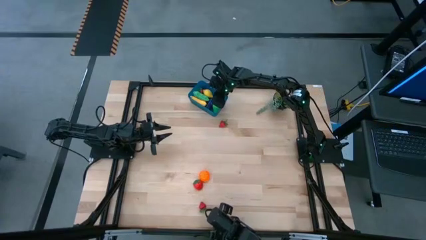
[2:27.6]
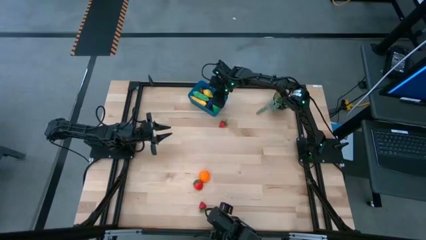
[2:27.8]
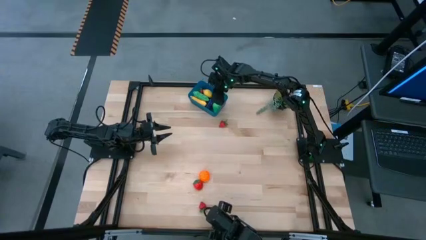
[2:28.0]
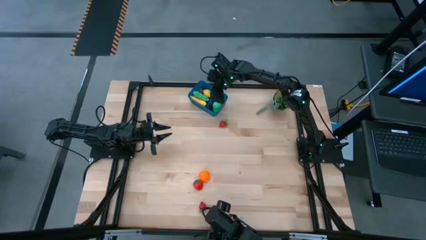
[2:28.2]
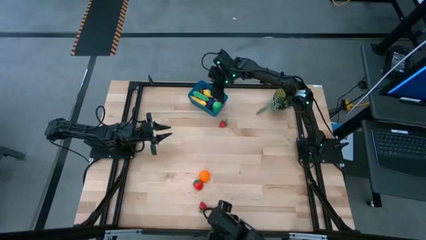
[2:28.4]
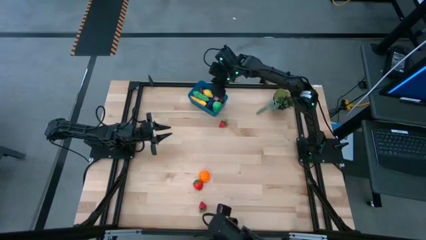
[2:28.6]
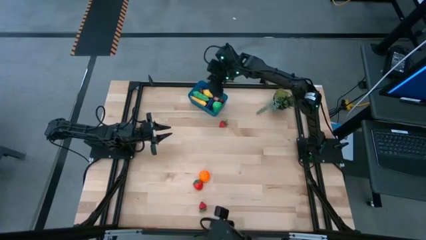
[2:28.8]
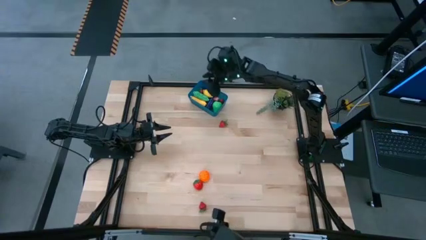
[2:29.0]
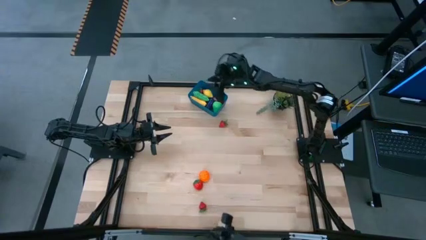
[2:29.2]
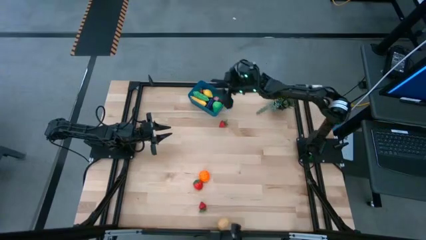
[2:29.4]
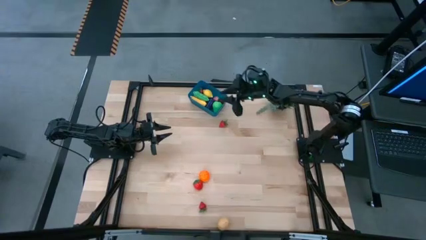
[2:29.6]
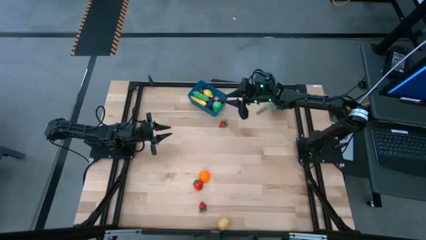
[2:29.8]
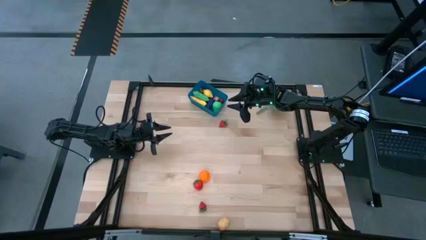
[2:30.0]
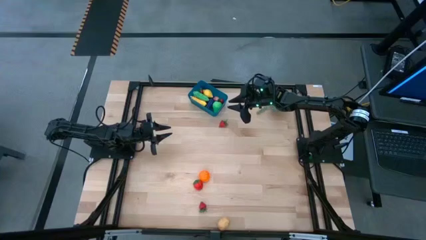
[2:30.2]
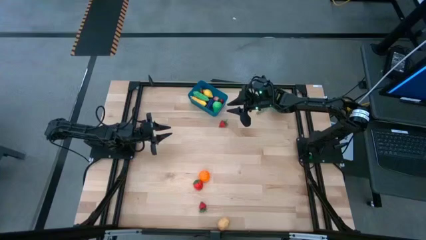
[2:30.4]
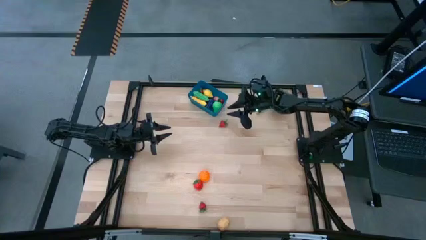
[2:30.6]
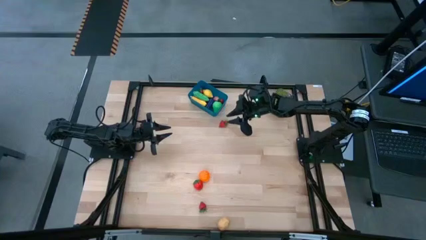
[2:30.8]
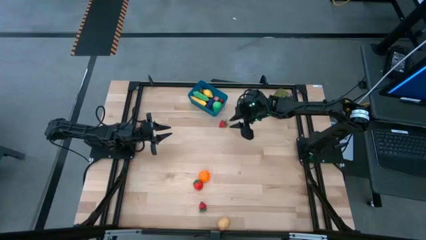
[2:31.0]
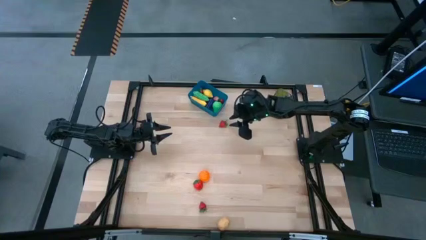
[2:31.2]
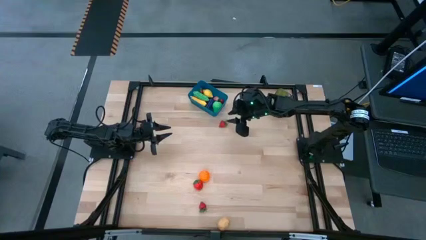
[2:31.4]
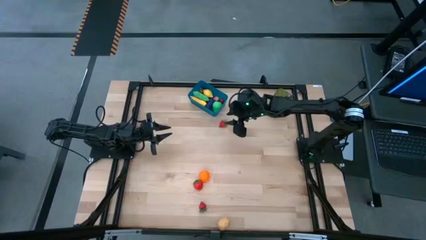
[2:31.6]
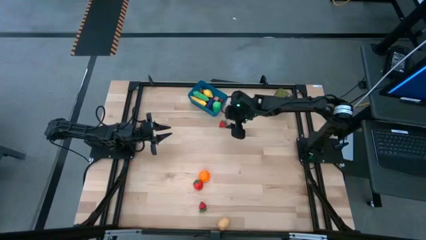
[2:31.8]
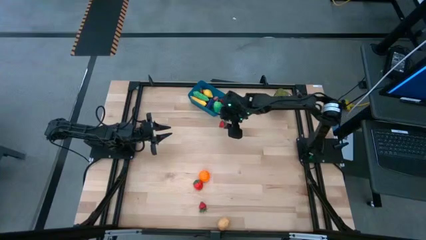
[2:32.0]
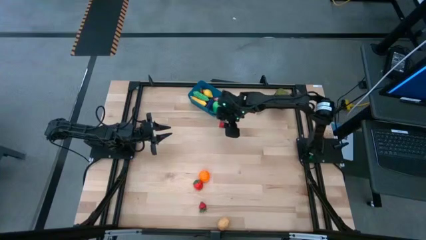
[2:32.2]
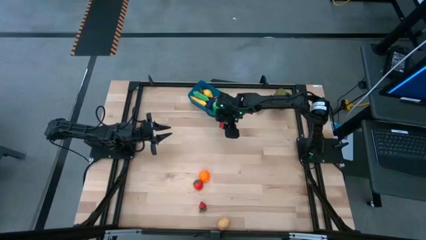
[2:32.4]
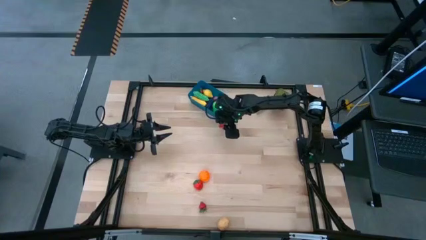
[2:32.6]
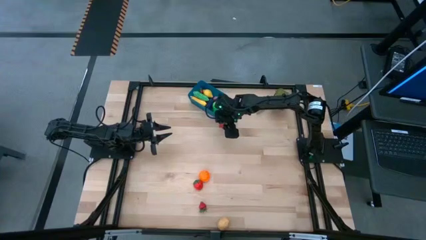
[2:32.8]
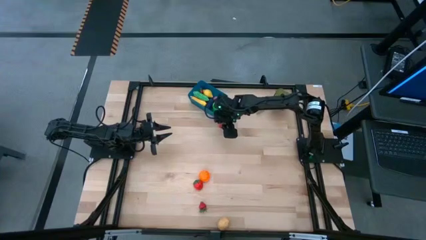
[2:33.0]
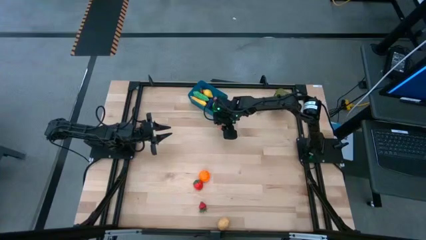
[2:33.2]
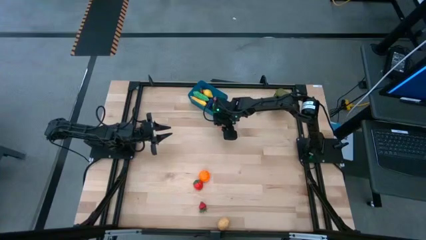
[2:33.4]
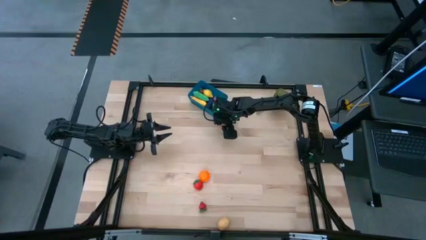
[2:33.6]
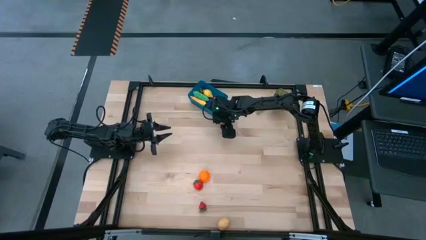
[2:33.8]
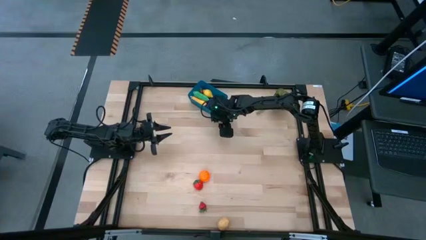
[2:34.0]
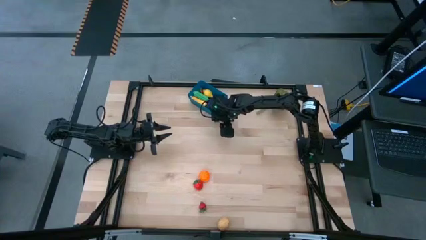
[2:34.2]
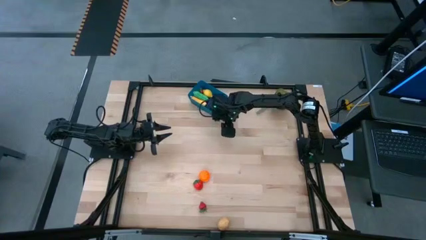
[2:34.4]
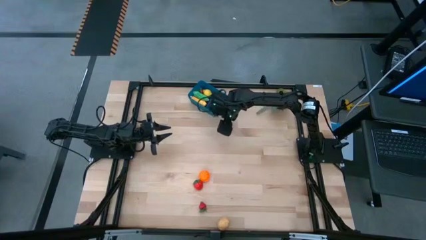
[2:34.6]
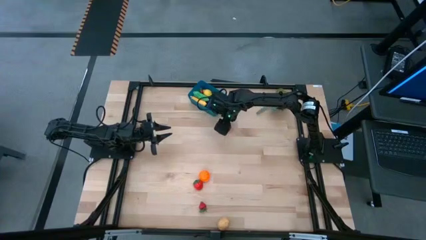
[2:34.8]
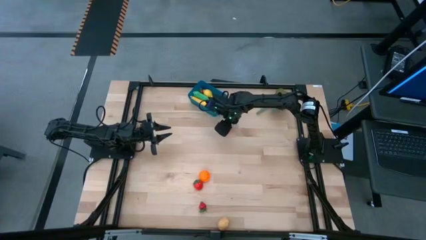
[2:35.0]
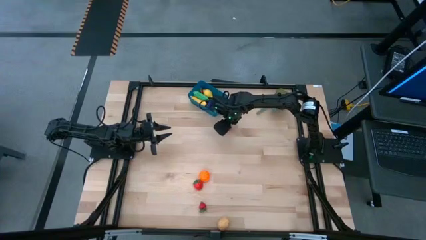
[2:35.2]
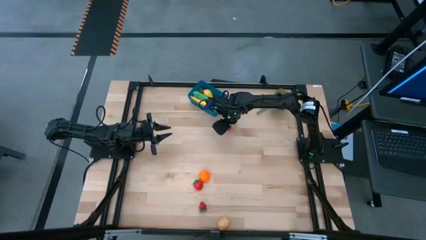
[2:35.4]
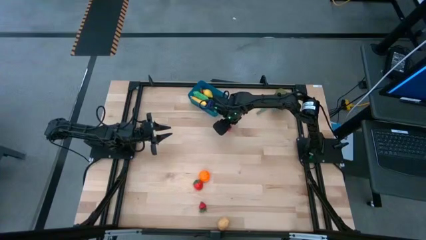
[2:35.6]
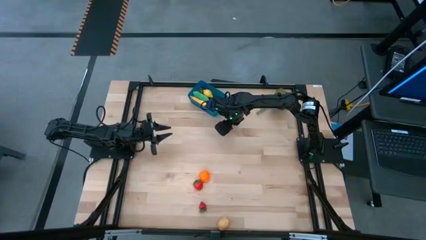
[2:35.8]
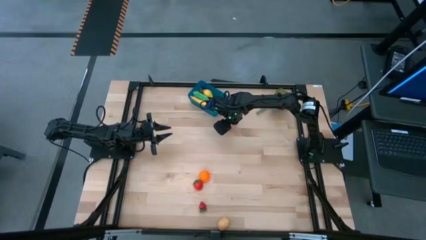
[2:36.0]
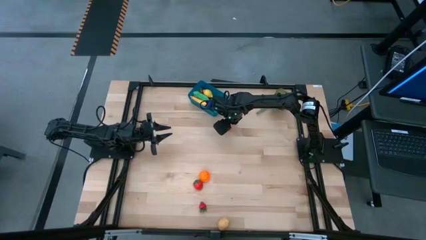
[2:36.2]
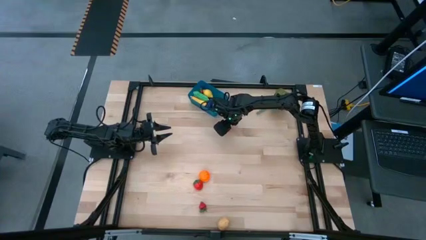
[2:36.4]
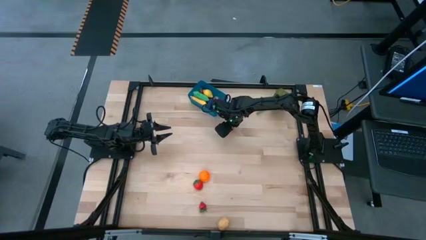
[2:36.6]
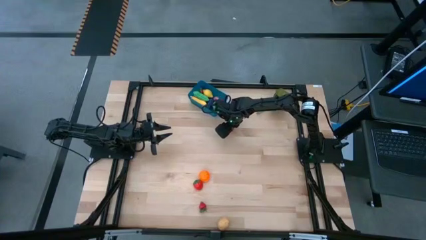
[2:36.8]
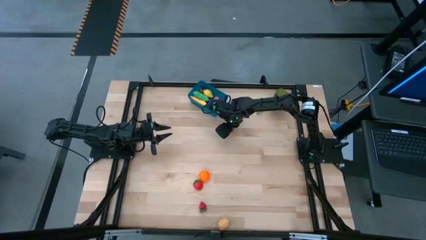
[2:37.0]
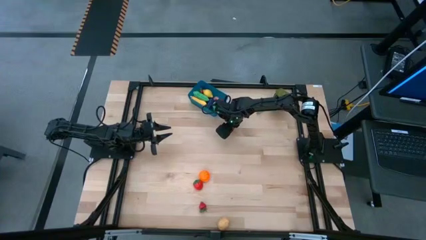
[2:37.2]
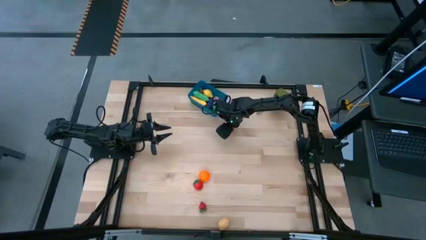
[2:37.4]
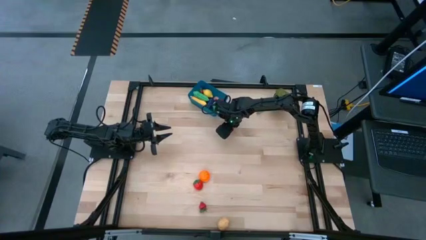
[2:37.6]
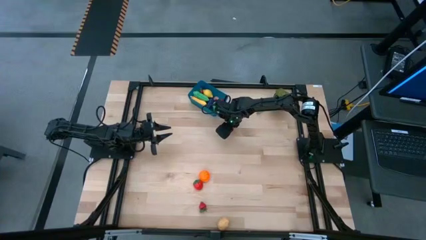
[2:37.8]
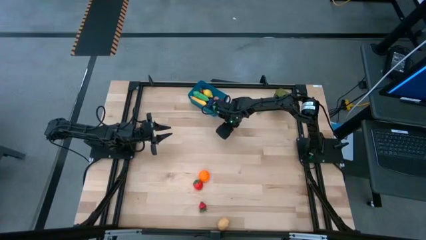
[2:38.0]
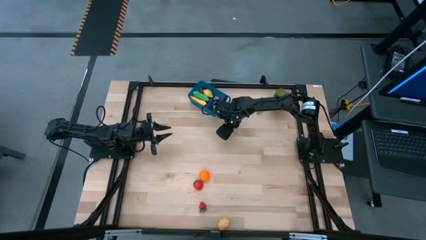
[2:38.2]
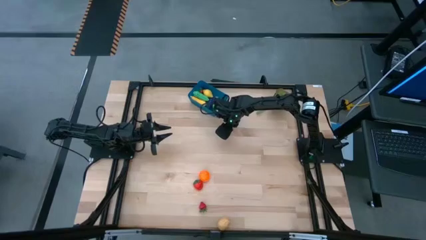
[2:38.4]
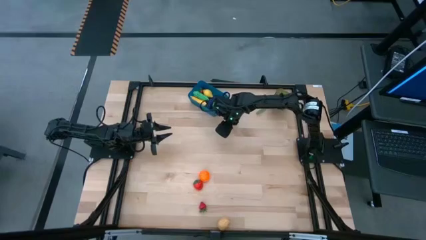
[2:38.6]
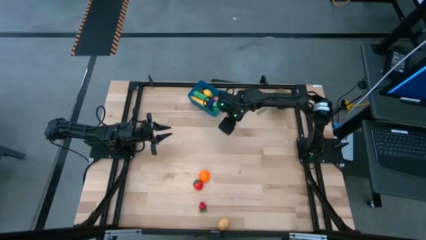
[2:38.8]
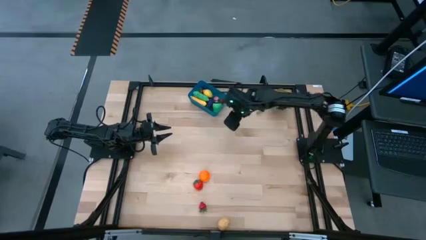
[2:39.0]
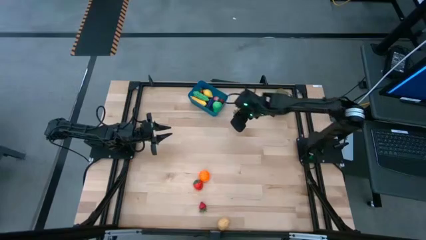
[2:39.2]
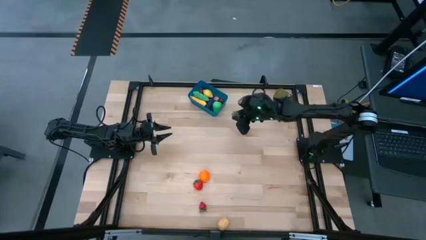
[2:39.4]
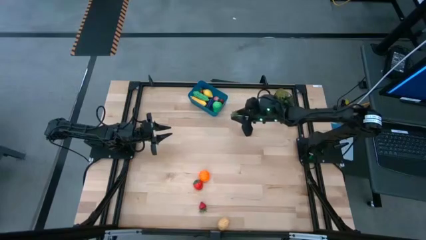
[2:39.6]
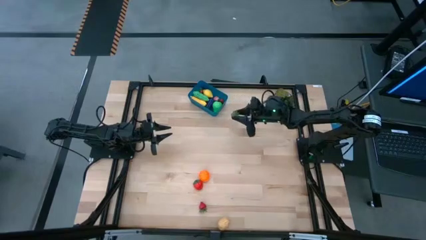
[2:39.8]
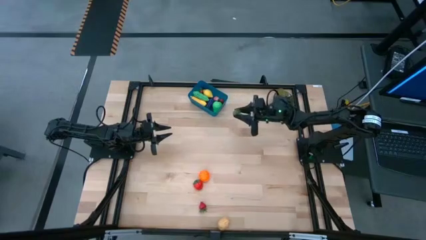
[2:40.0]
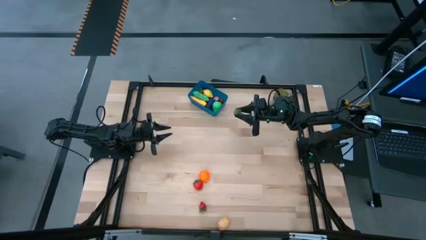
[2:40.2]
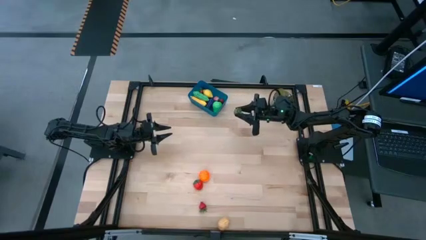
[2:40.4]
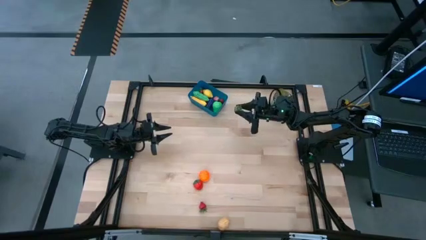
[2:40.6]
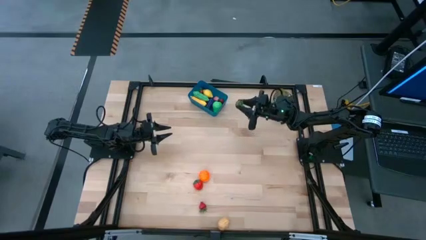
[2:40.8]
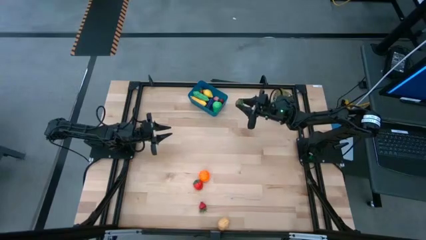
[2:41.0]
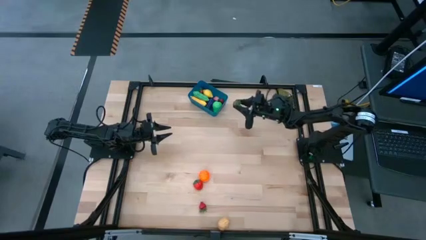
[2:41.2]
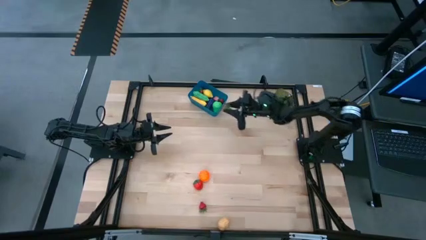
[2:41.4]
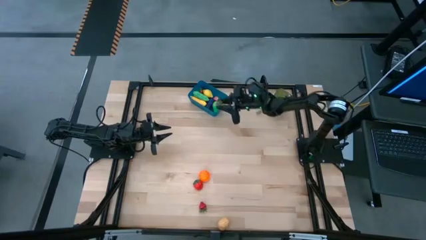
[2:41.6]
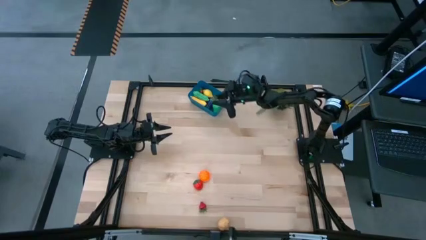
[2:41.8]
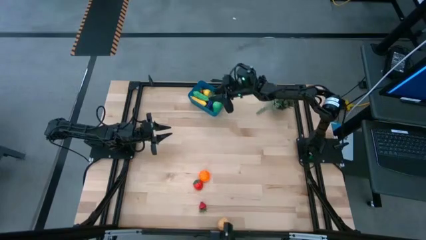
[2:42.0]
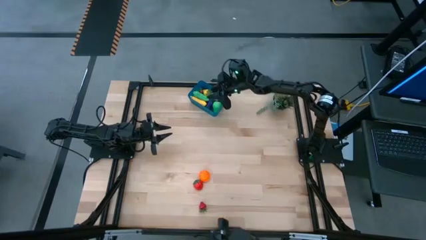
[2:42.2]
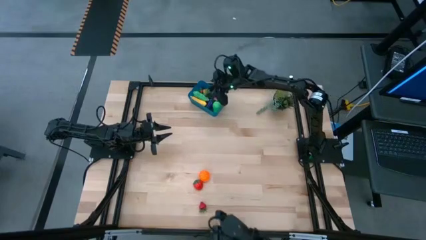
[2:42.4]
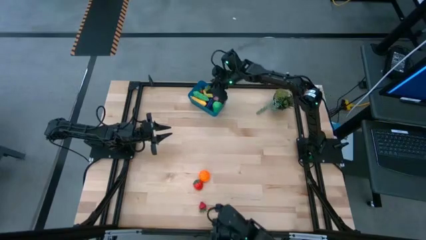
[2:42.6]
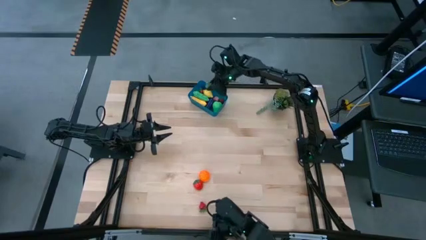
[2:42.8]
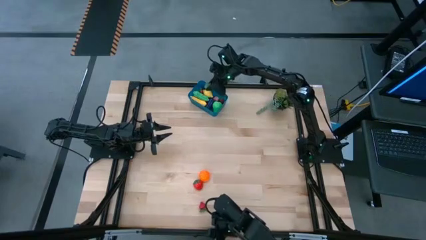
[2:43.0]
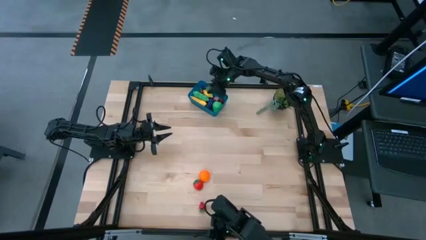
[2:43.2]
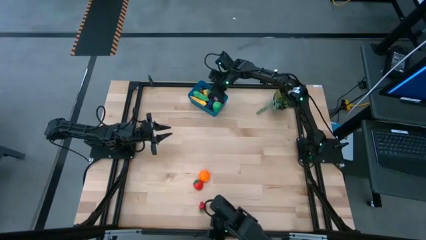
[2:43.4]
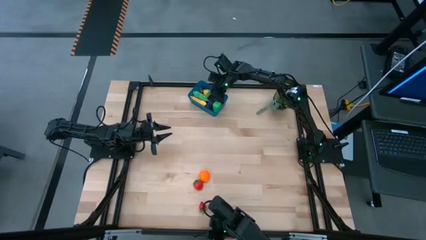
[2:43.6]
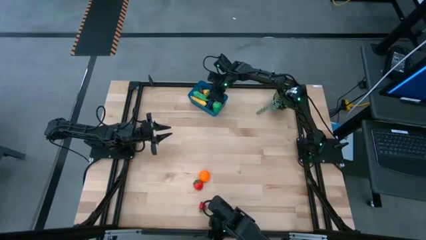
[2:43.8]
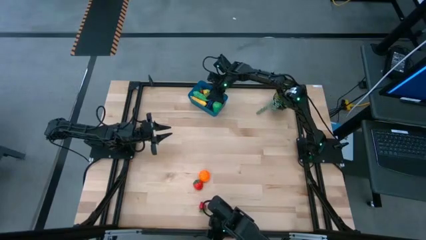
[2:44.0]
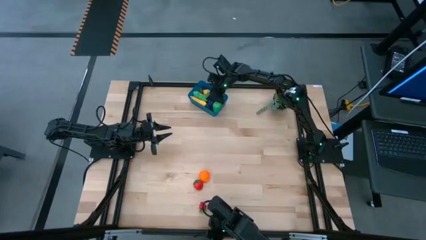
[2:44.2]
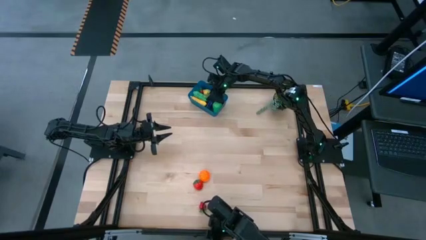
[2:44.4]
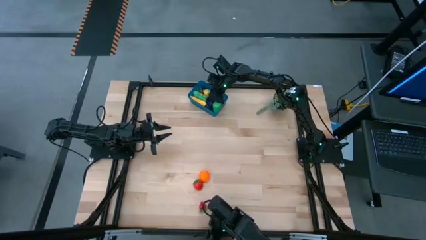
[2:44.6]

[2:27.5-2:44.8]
Task: Pick and placing Produce into tupperware
Put the red strawberry into the blue bin
